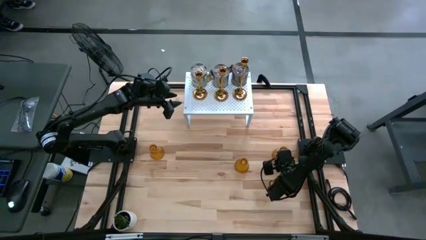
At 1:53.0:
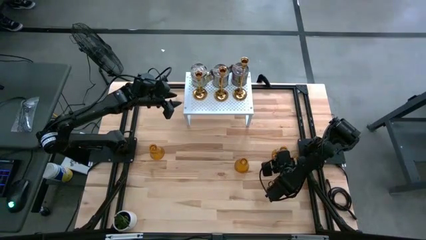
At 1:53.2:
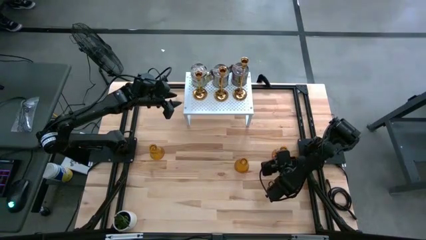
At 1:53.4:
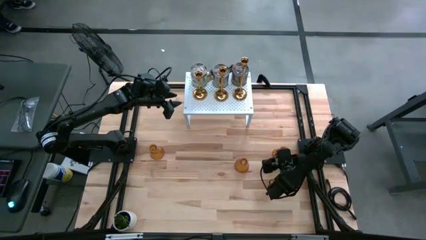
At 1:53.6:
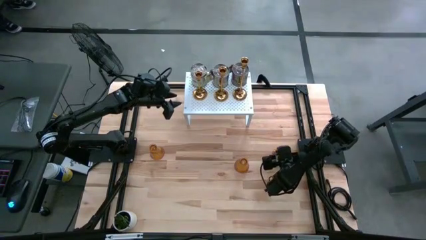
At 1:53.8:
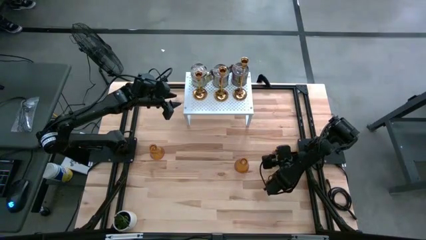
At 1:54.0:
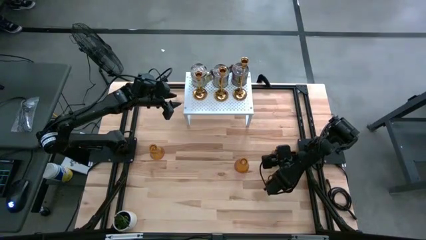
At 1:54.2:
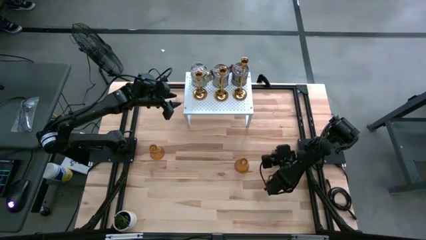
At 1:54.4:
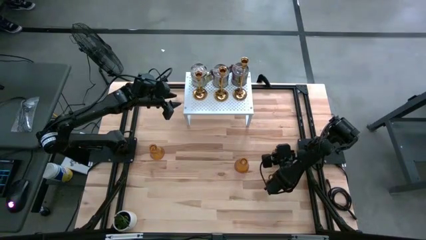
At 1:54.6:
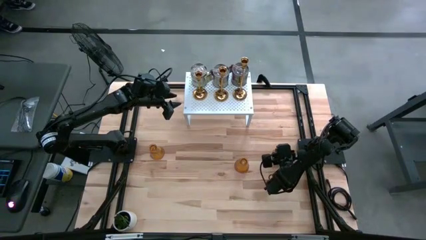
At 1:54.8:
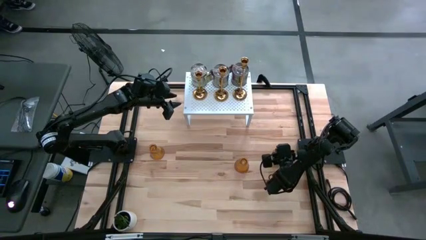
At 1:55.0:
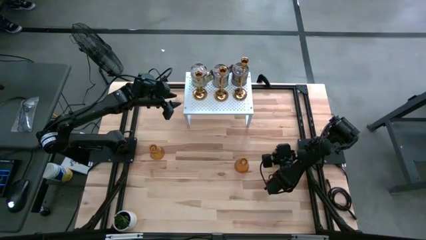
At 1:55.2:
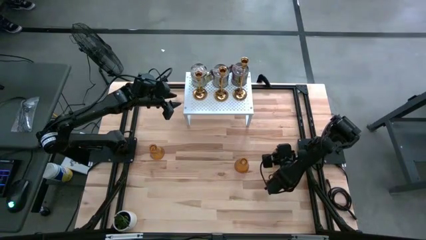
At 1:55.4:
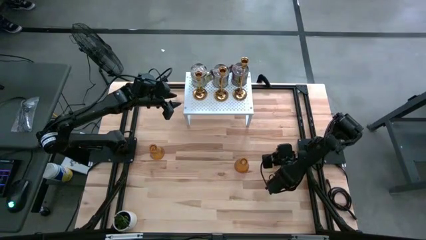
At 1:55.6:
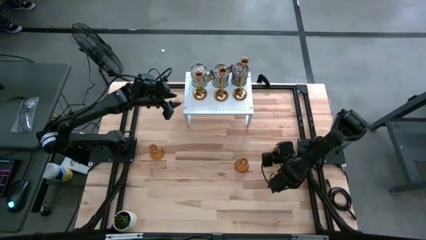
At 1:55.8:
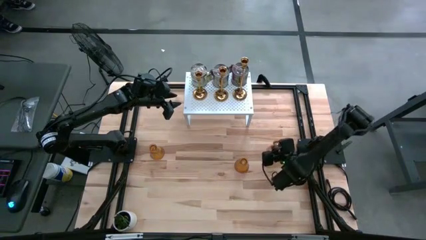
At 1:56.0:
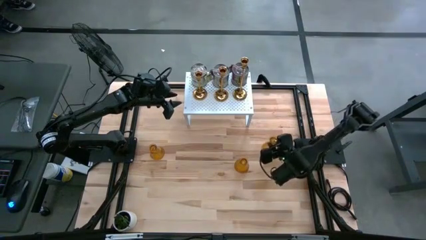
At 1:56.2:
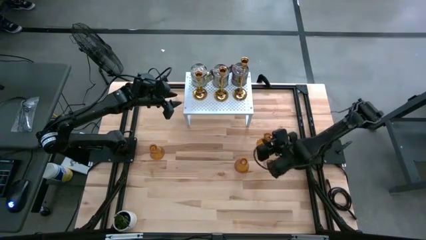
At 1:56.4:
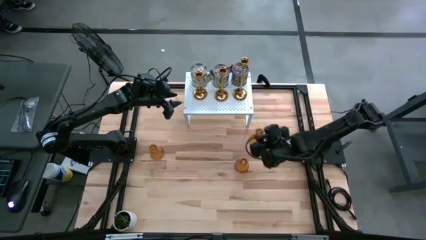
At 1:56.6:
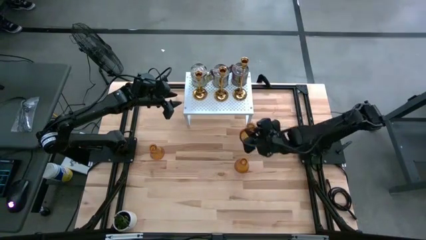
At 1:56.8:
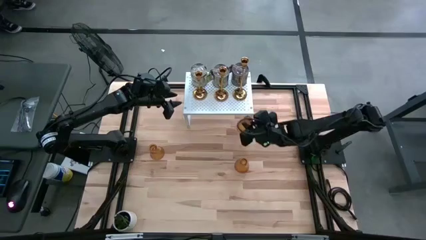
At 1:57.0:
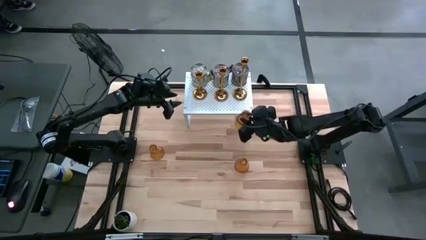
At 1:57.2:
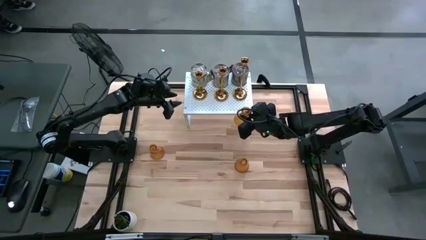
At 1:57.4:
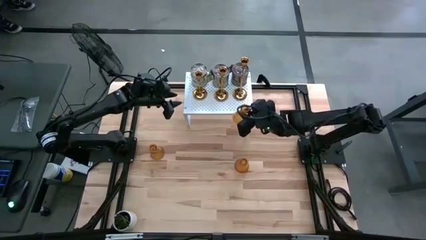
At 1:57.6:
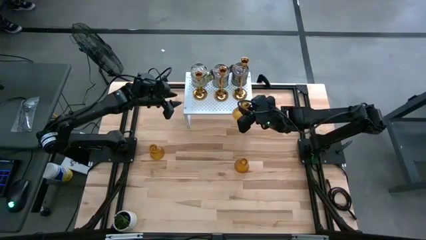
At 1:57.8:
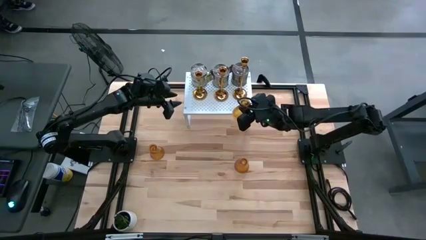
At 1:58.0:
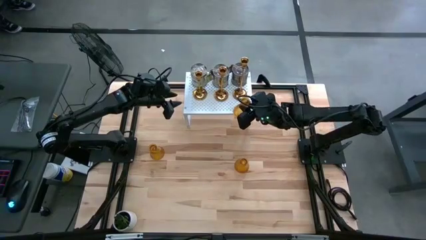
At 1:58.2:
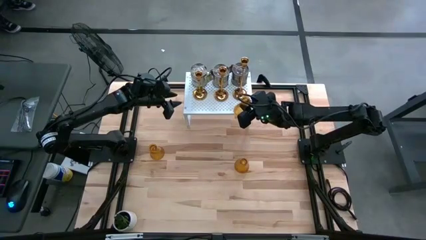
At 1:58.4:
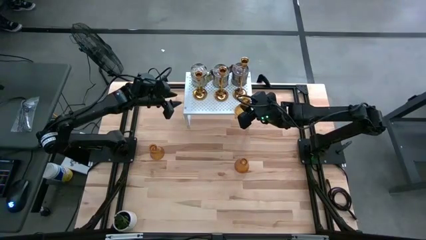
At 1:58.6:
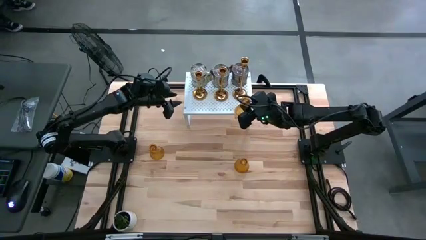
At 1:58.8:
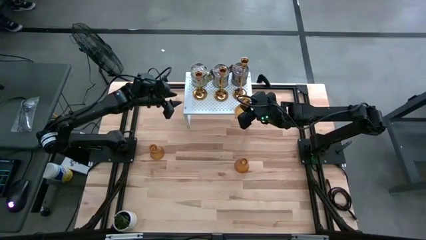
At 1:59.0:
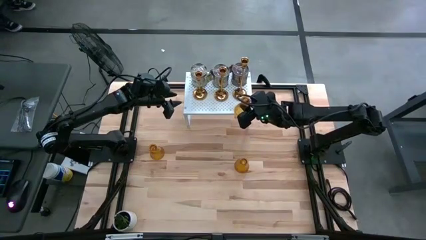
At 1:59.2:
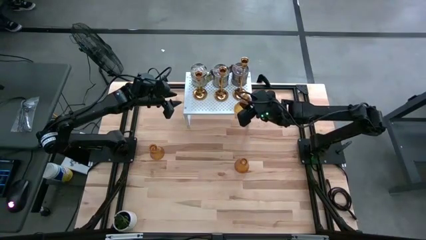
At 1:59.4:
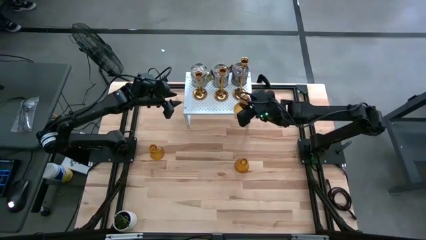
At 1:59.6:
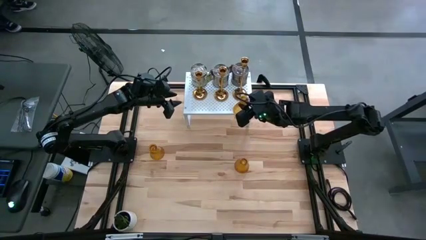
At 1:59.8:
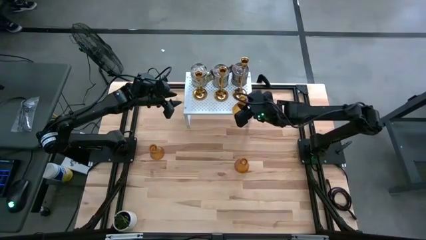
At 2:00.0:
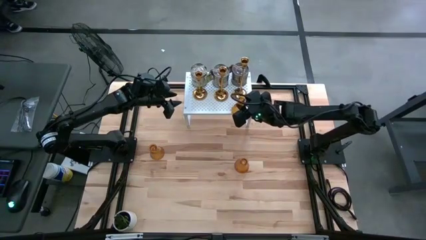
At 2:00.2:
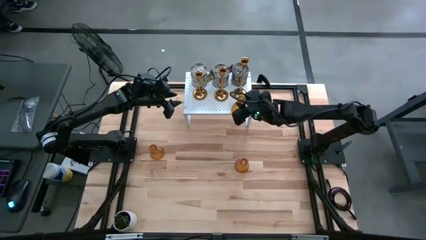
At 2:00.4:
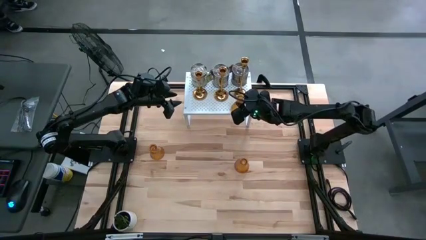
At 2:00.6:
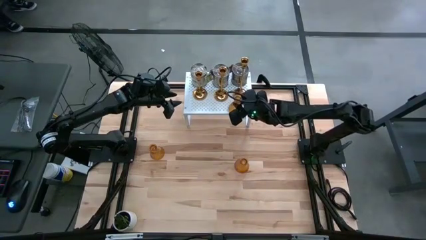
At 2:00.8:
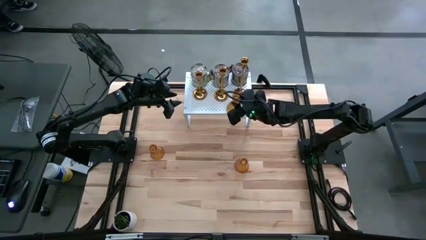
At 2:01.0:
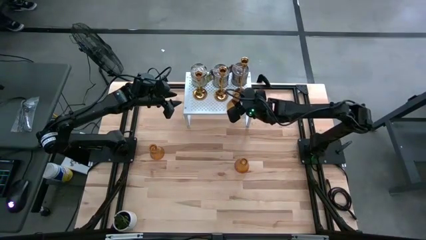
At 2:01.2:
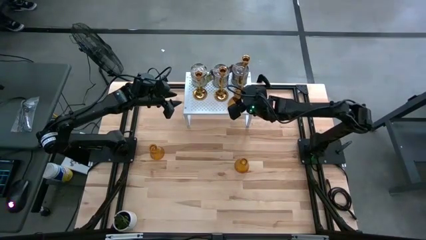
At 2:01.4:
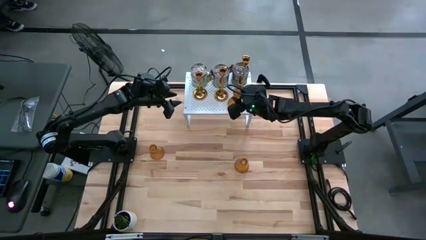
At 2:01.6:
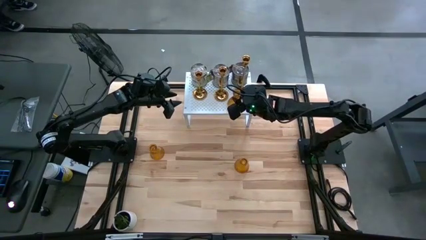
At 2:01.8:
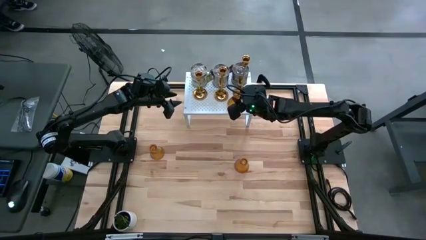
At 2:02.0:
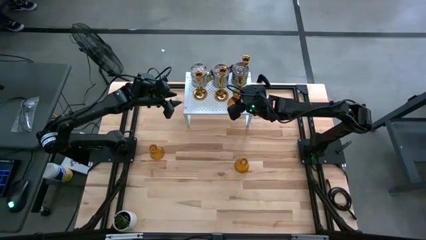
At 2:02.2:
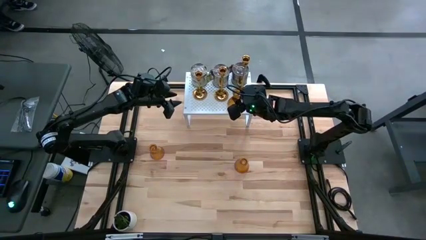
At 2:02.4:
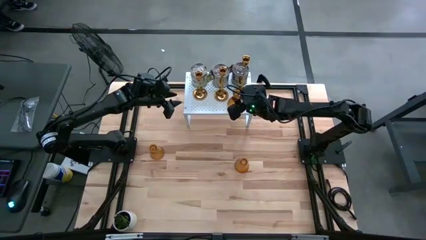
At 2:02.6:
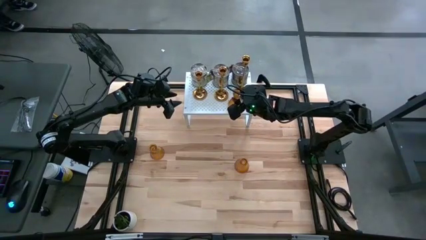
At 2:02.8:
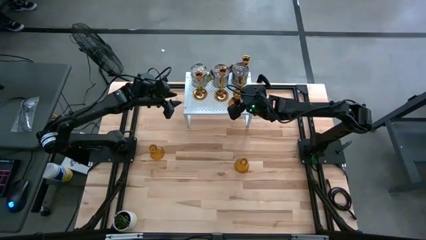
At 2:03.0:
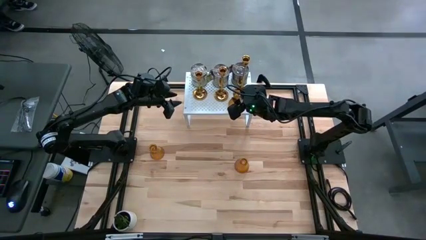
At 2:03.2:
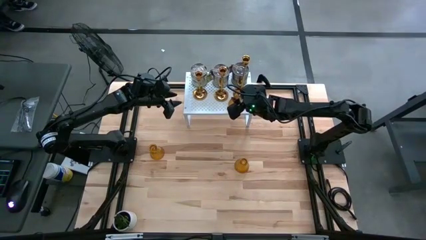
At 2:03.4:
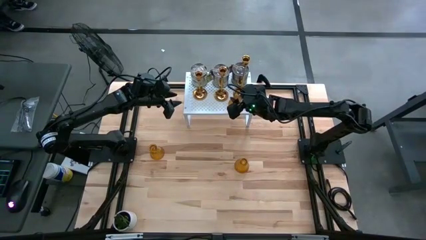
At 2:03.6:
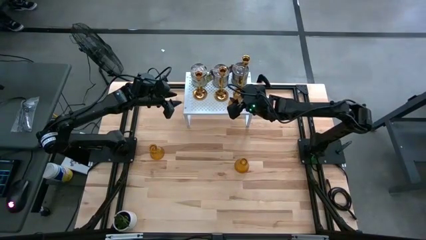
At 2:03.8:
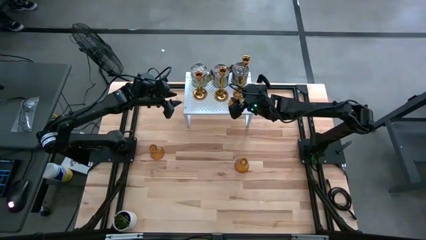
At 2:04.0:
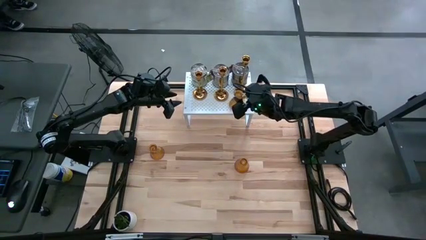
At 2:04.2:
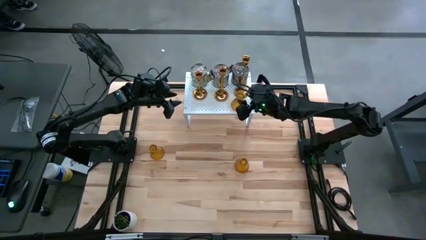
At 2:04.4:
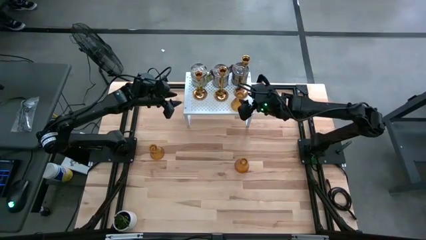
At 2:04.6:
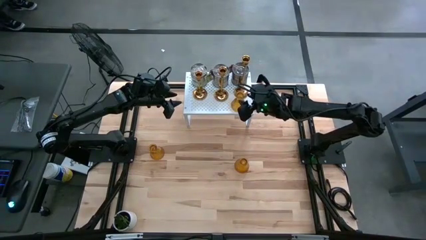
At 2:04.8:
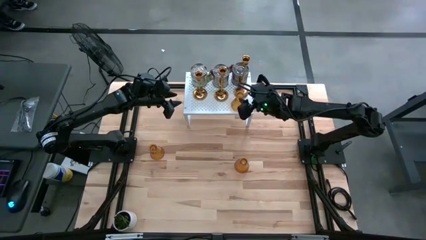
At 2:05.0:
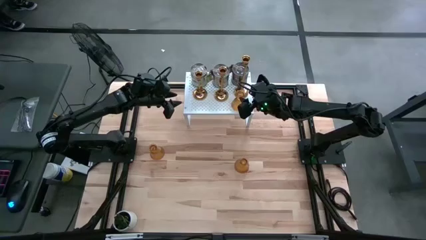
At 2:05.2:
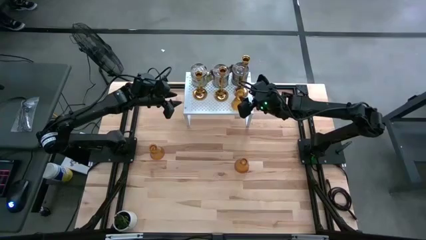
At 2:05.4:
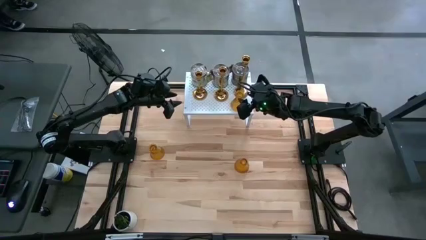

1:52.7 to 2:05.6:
Task: Pick & Place candle stick holders
Put the right yellow candle holder on the shelf

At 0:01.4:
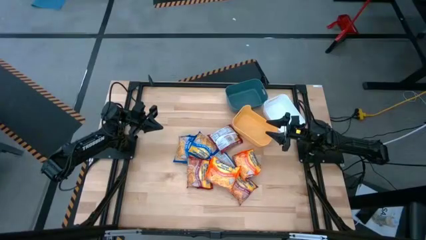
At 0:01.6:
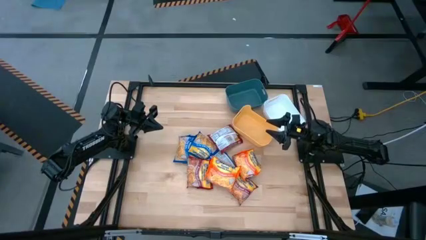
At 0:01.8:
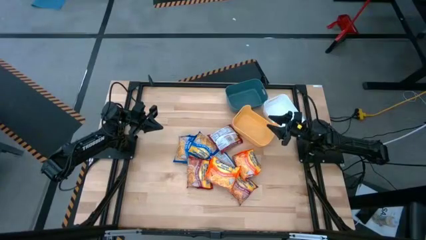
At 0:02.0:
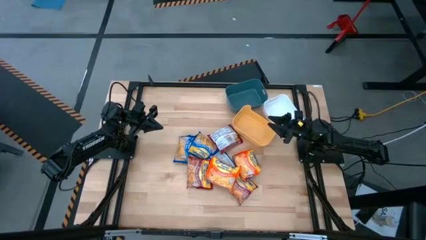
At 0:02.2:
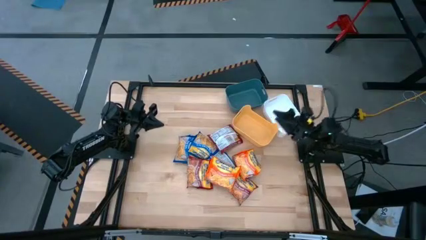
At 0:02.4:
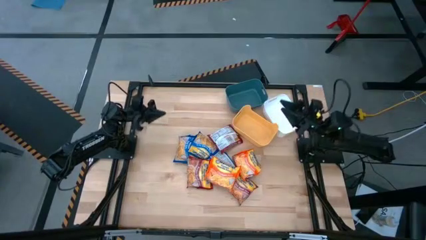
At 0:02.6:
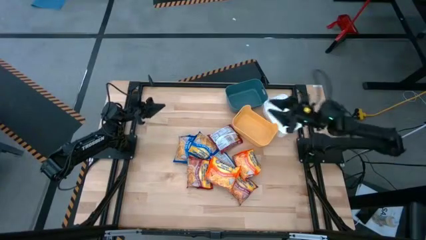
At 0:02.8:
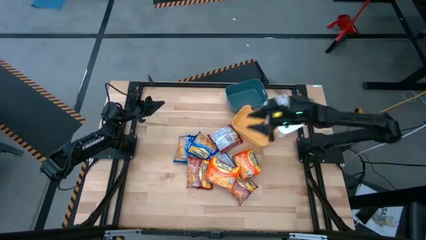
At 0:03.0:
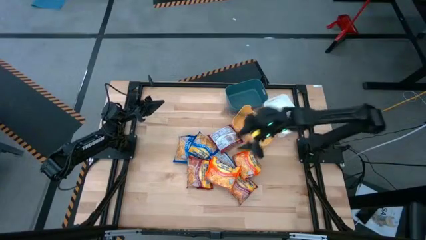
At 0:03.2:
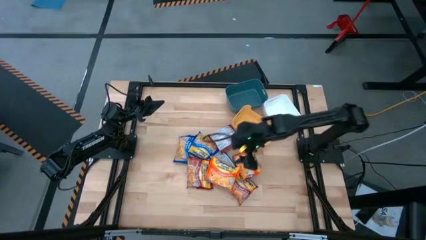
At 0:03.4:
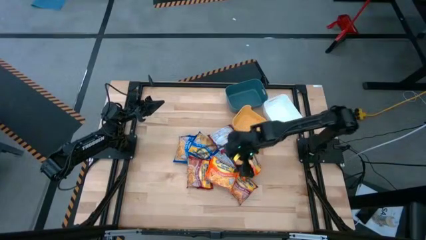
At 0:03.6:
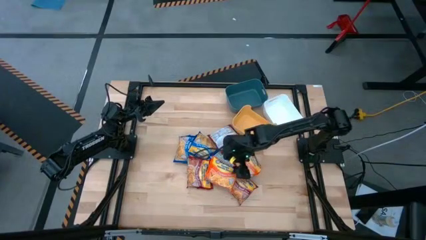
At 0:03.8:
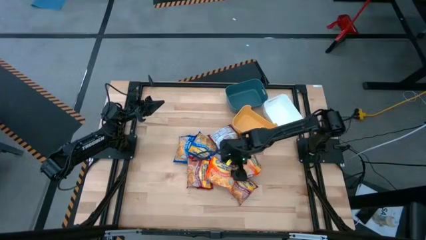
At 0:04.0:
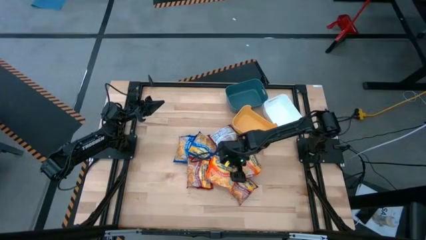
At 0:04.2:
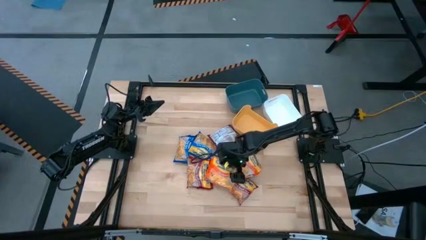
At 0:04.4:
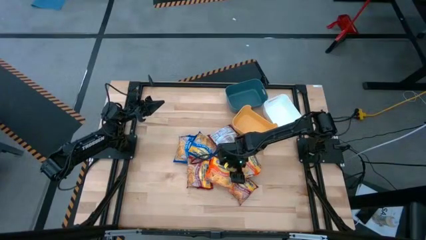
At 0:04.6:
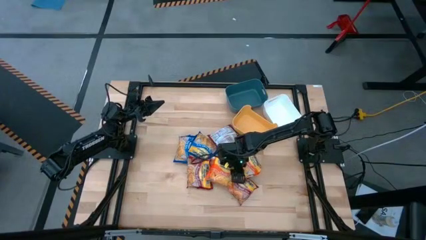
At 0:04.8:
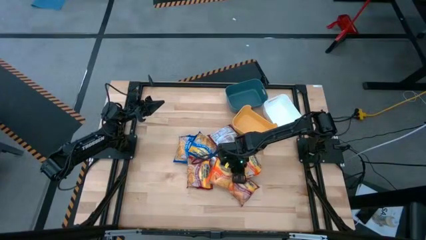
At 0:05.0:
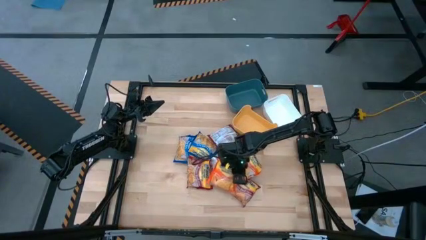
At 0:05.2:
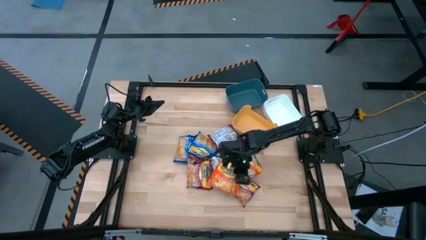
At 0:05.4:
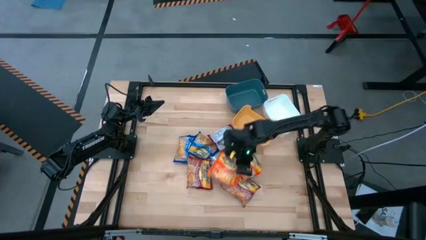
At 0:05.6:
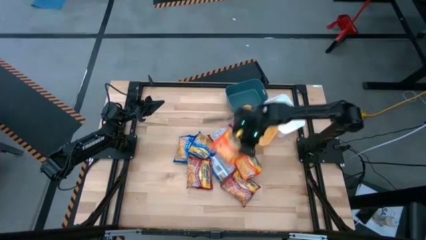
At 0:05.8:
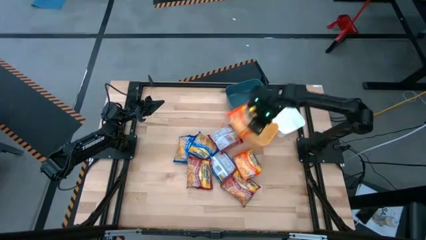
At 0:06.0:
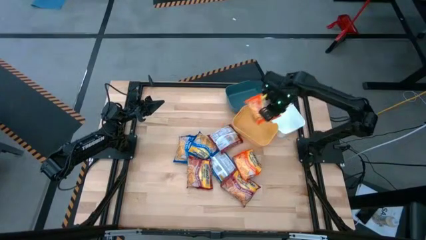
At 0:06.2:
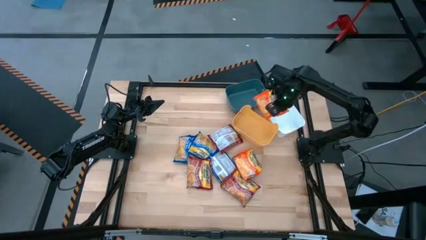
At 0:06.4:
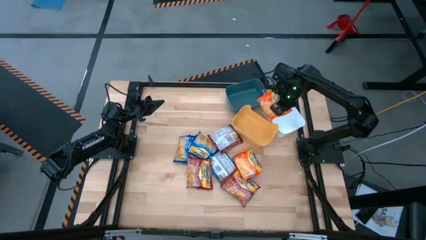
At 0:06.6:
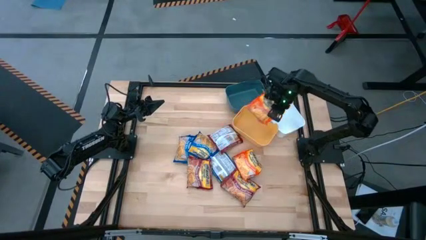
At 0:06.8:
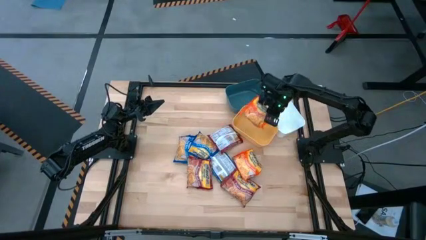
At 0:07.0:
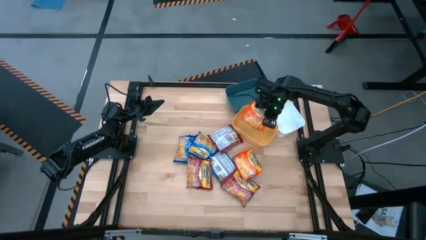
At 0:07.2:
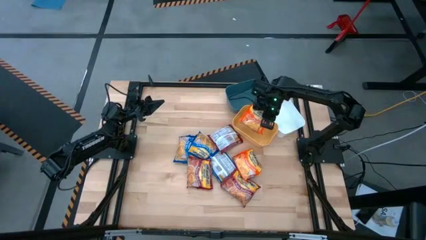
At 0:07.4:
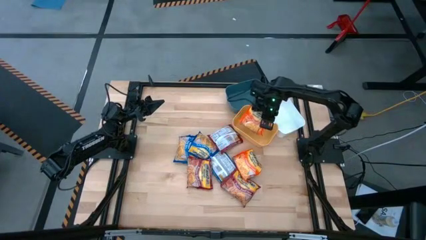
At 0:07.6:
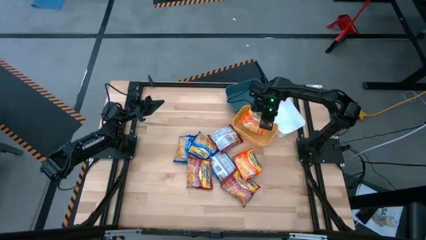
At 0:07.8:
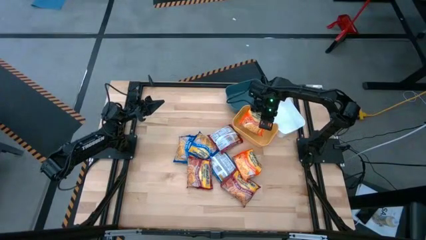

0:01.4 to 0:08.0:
Task: Sort Maruchan noodles
Put the left orange noodle pack into the yellow bin
